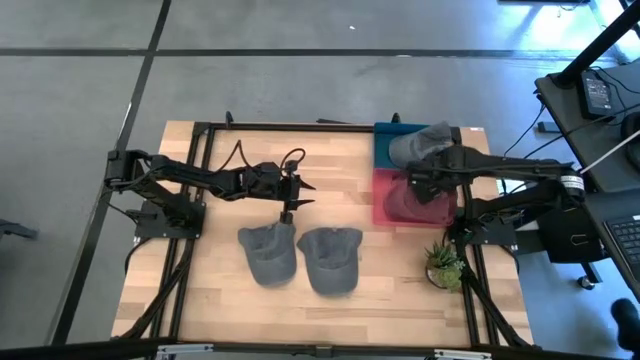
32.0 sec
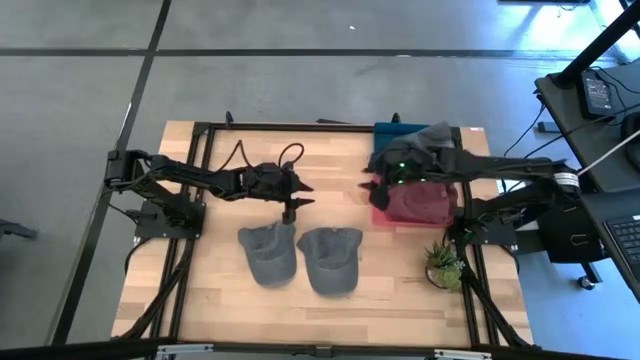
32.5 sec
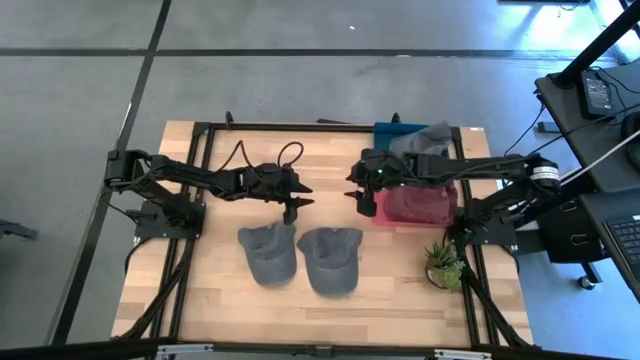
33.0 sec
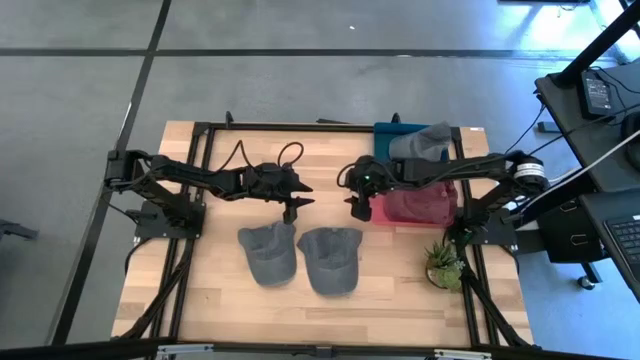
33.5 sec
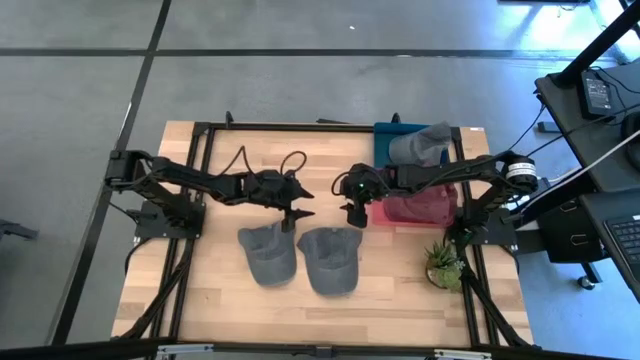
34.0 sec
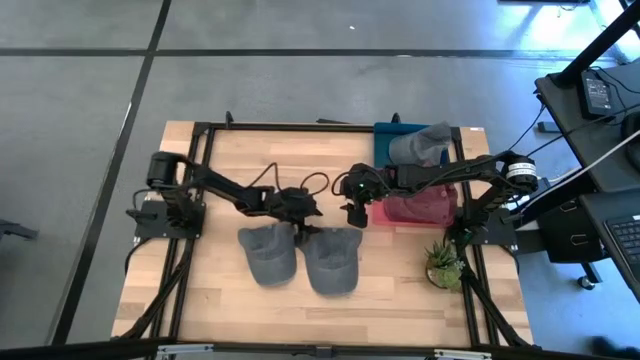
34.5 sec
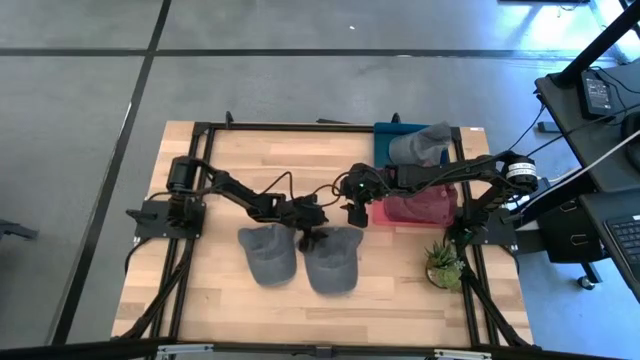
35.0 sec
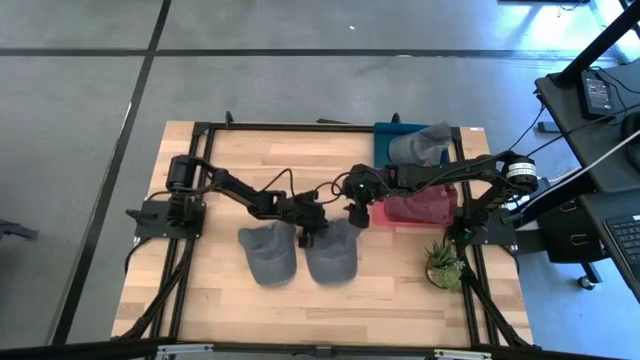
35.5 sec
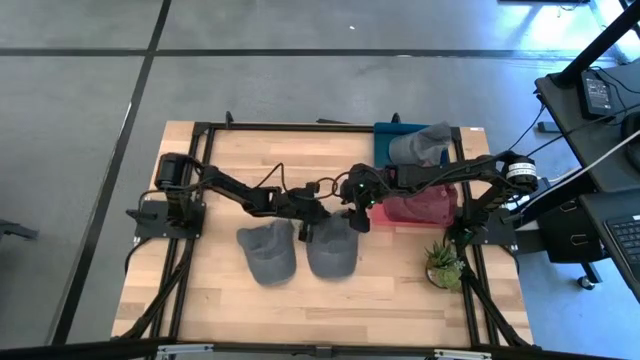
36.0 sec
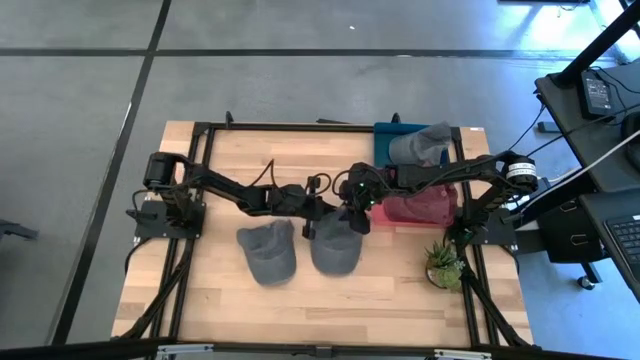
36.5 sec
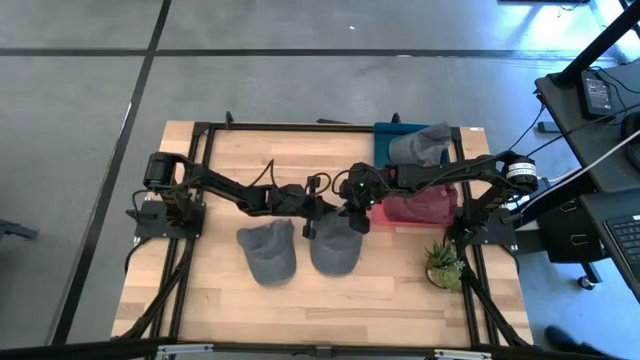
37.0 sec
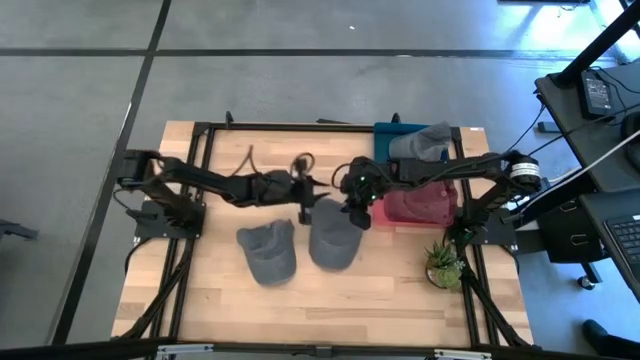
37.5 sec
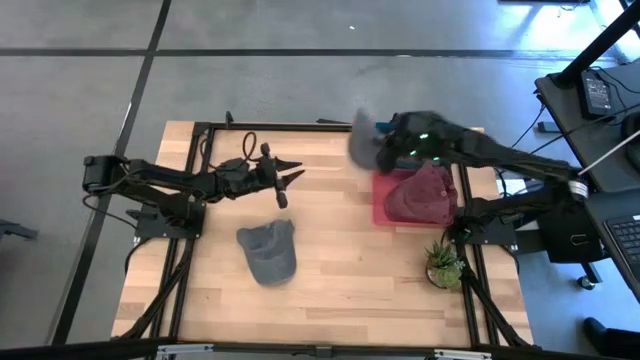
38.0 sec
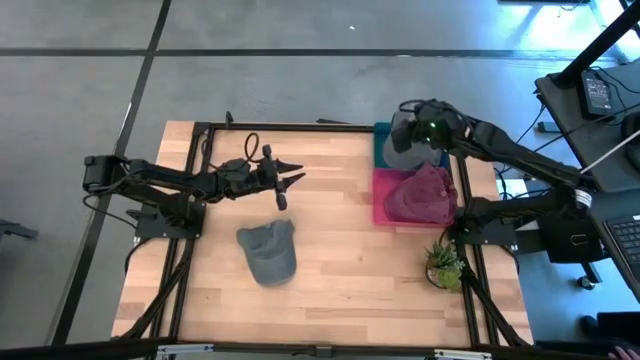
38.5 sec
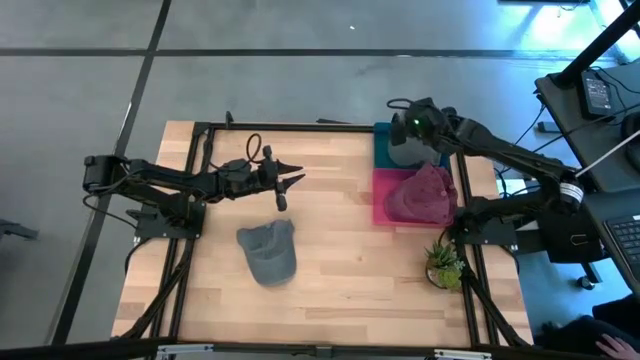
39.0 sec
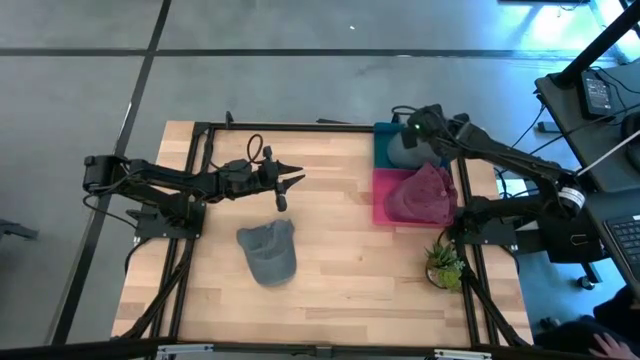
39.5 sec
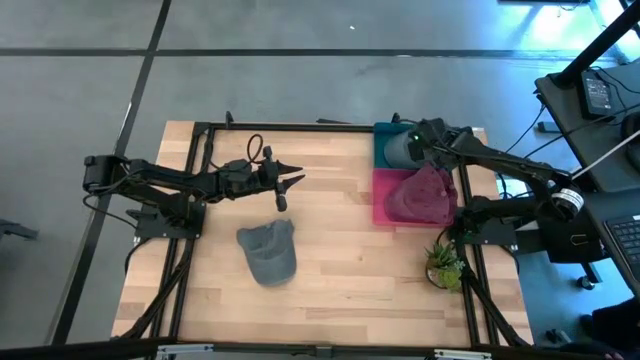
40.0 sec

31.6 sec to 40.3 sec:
Task: Pick & Place hat
Put the right gray cap into the blue bin

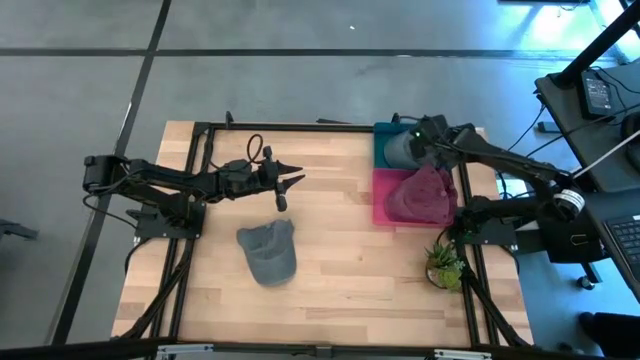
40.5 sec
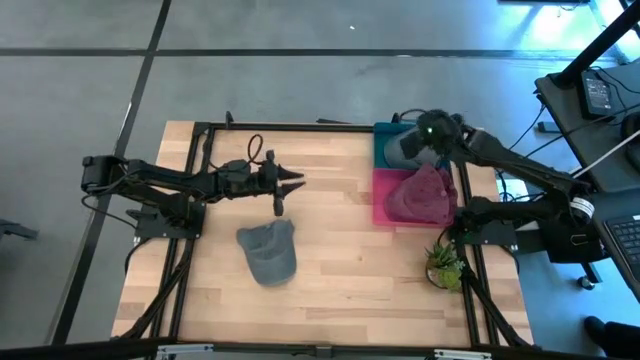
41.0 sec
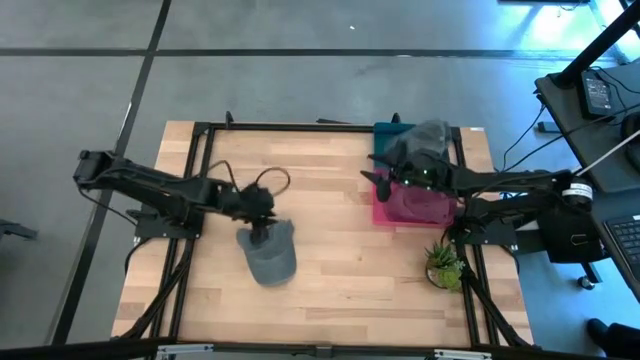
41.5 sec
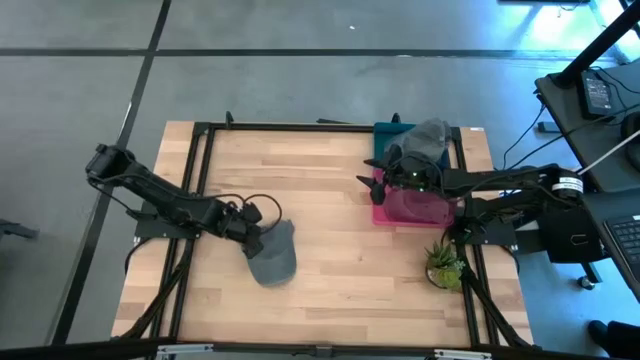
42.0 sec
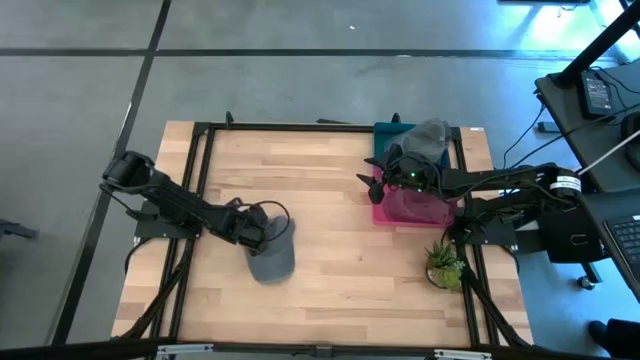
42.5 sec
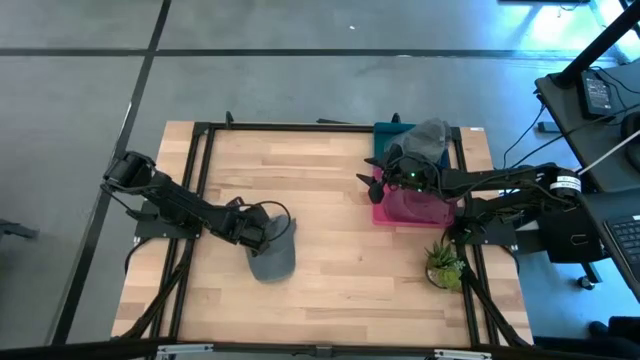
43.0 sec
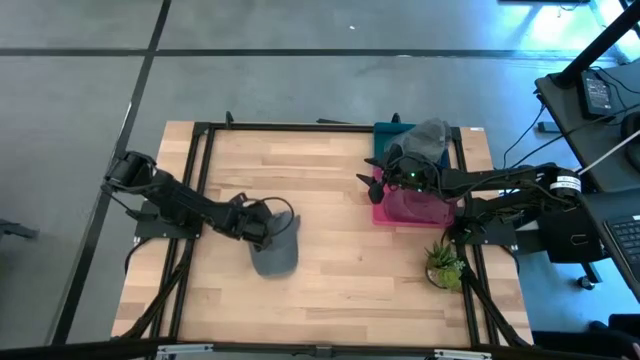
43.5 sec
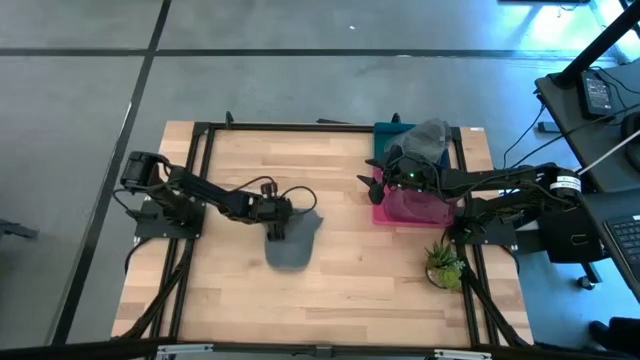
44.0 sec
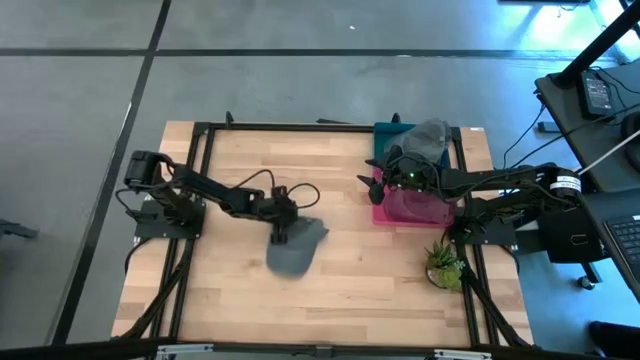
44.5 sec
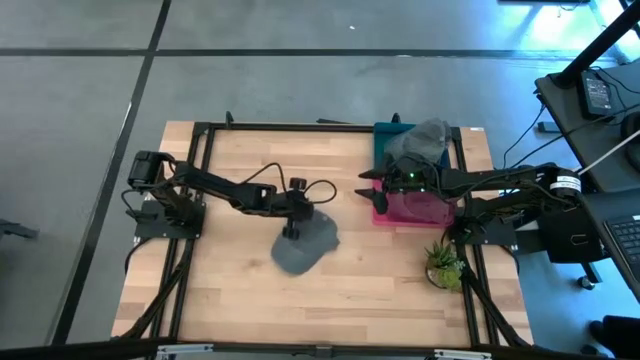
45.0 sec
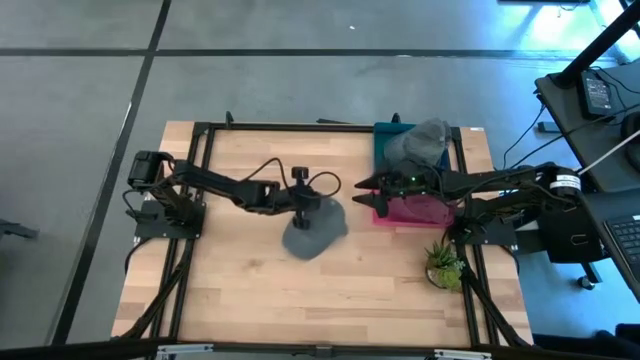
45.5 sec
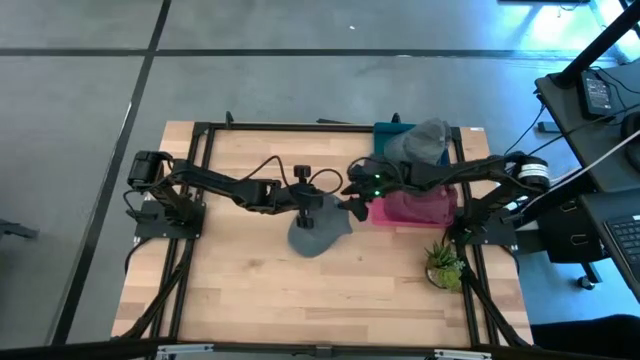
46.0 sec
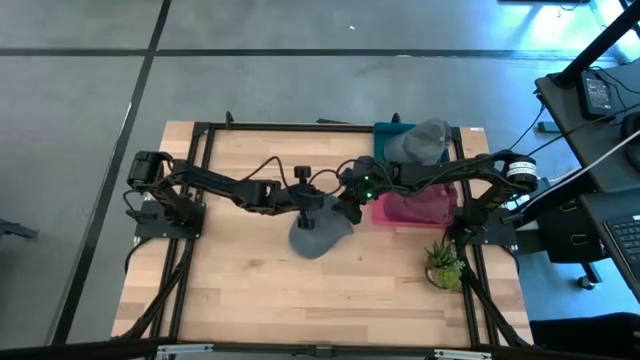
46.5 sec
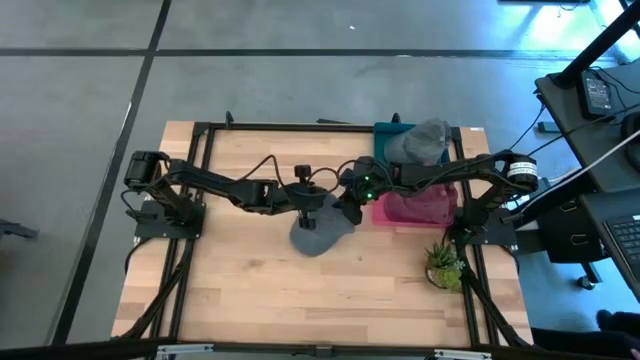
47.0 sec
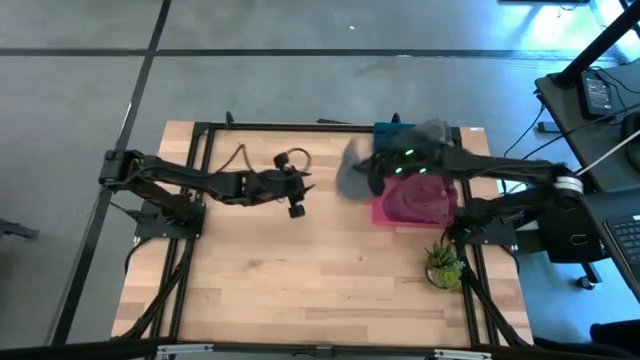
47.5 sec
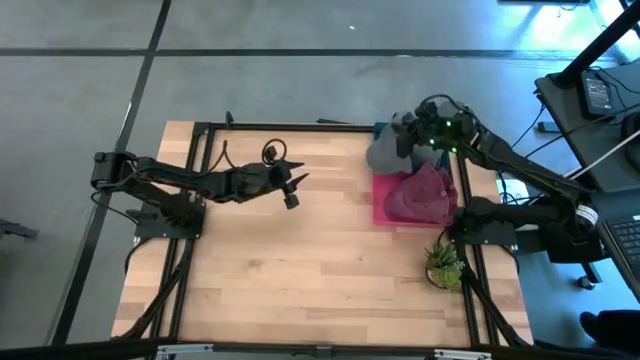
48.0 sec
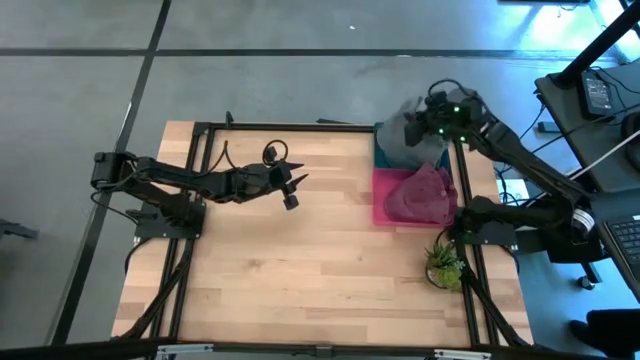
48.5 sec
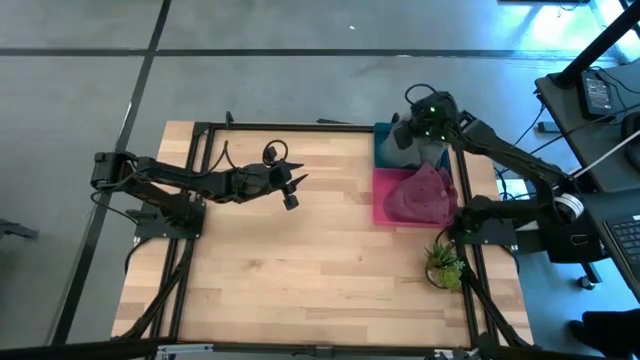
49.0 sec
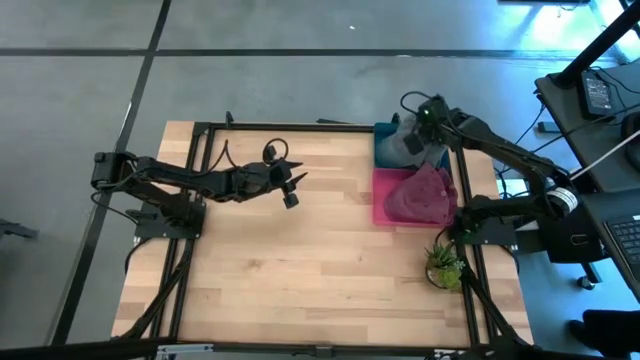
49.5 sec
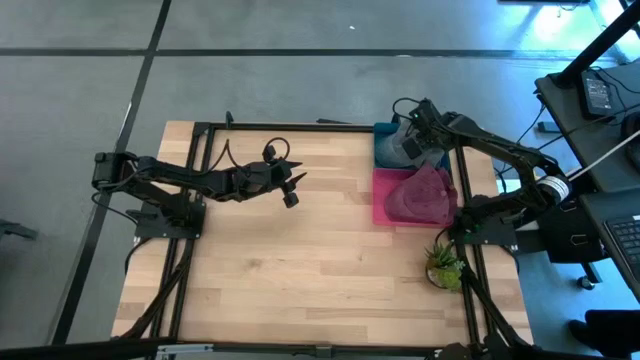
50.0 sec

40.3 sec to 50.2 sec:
Put the gray cap into the blue bin

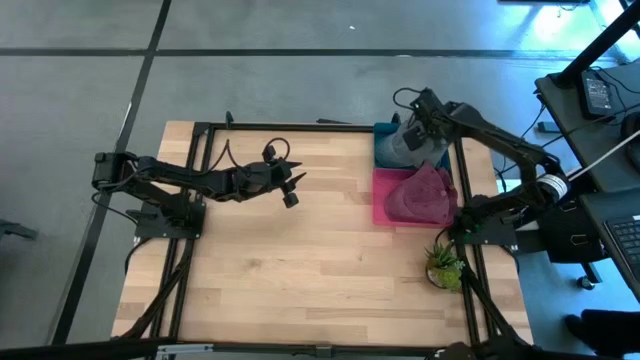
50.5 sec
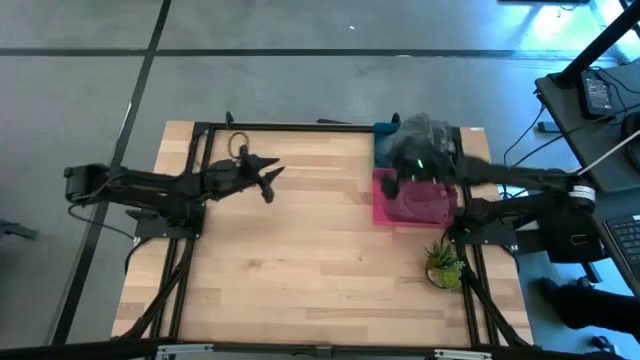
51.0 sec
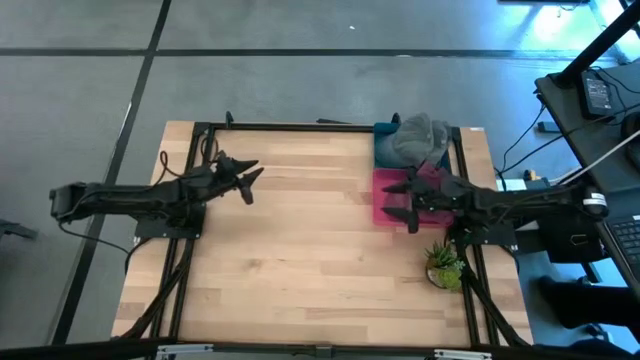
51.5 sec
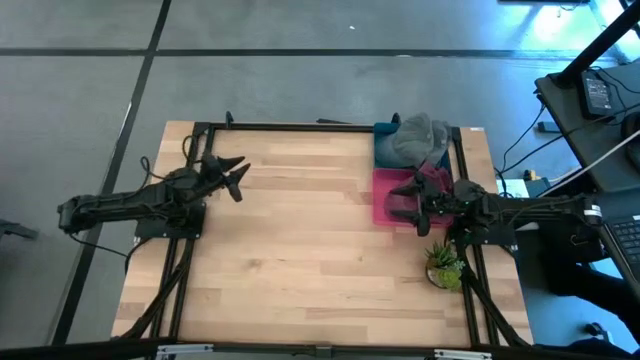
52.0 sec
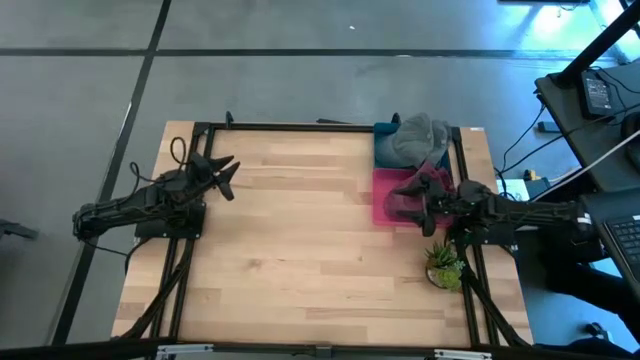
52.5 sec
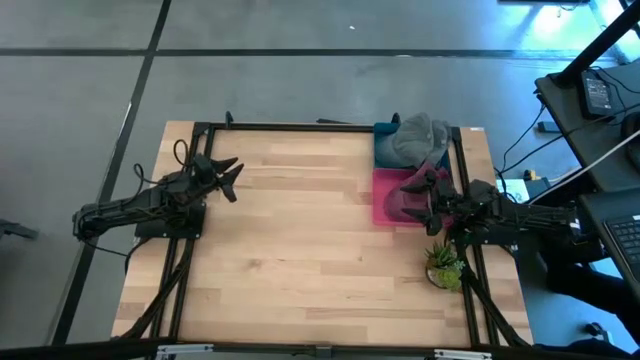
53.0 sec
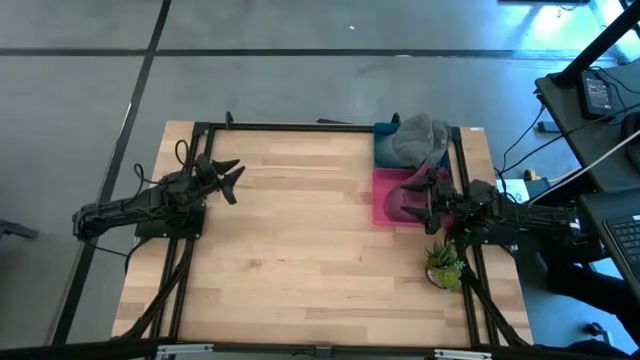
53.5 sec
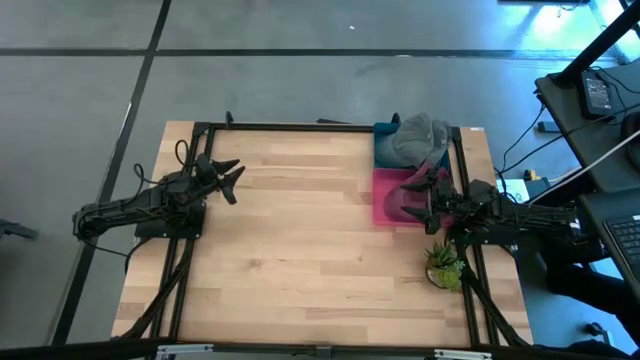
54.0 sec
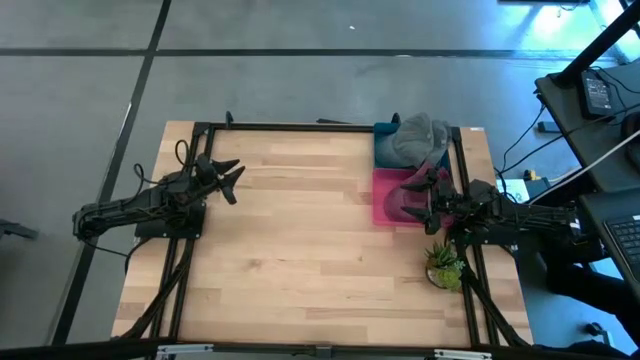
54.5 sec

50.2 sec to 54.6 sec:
Return to Home Position

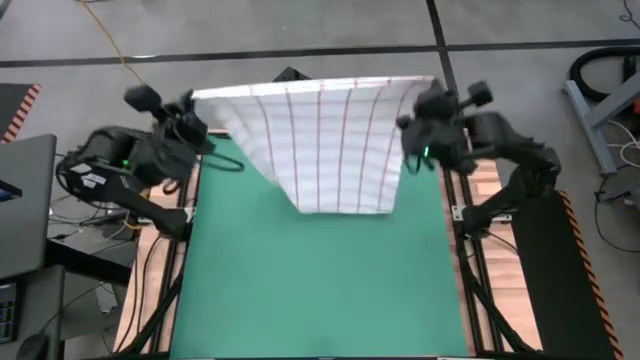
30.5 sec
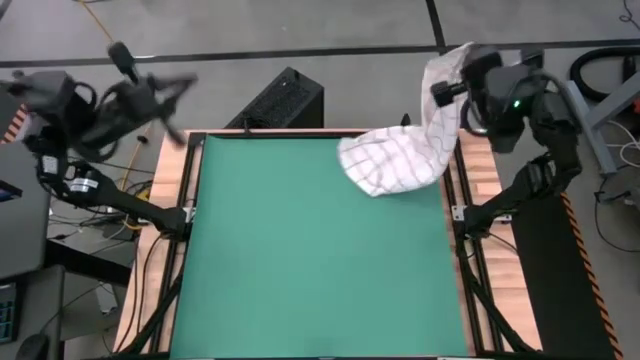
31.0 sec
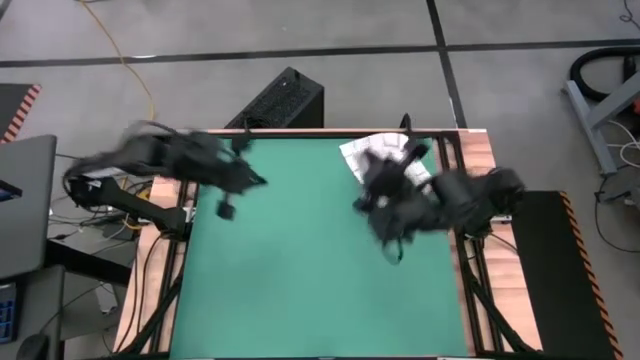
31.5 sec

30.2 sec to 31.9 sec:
Task: Roll towel into tight, uniform cylinder
Fold the white towel
